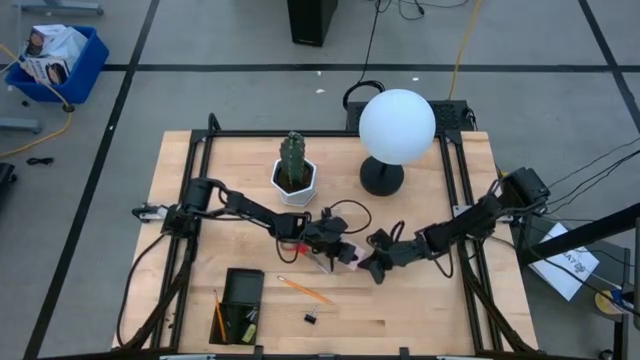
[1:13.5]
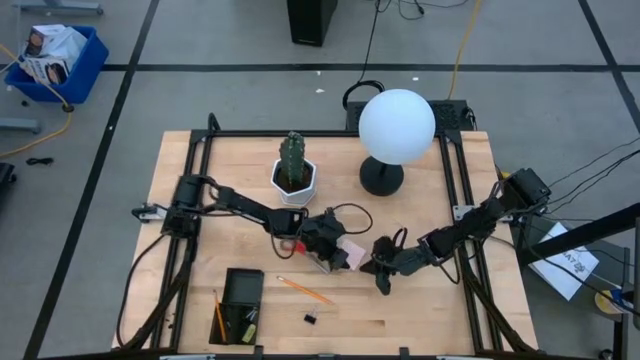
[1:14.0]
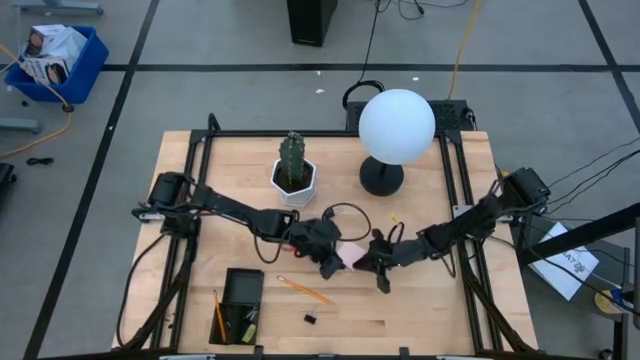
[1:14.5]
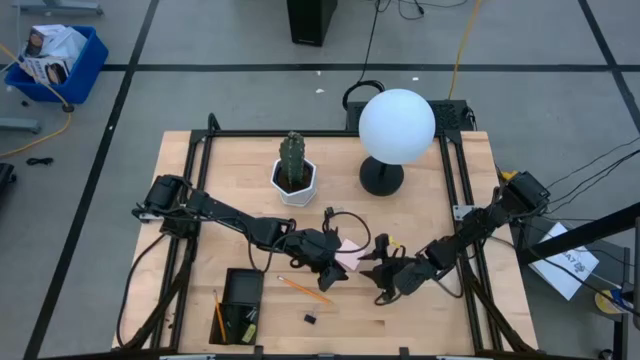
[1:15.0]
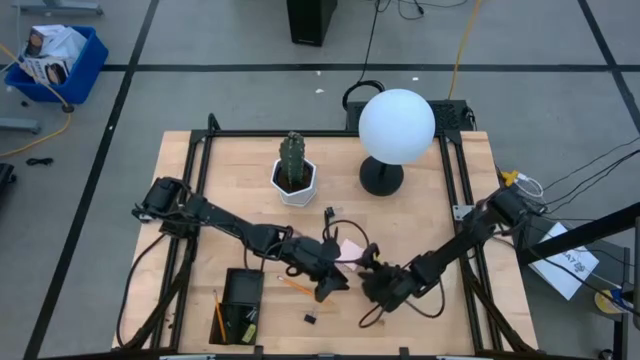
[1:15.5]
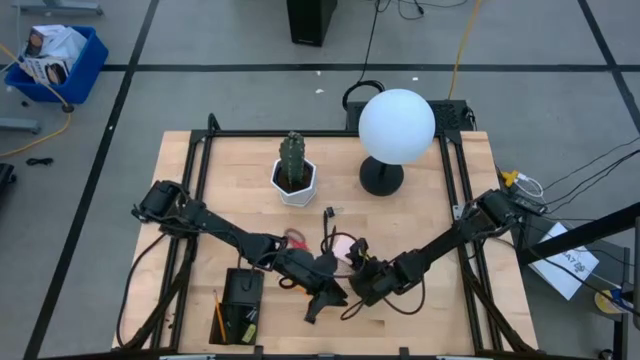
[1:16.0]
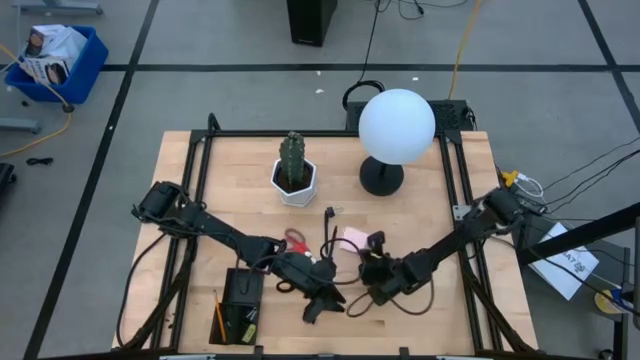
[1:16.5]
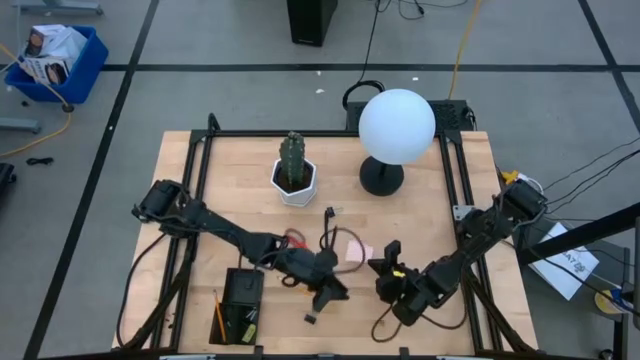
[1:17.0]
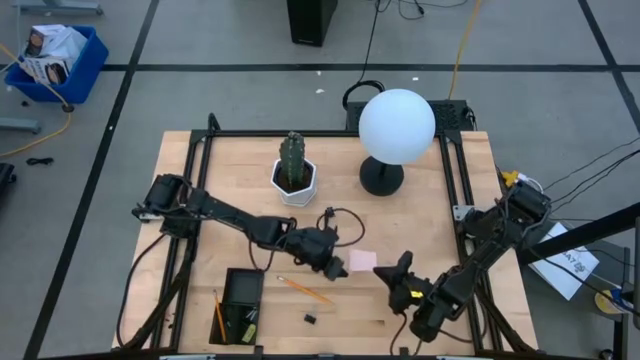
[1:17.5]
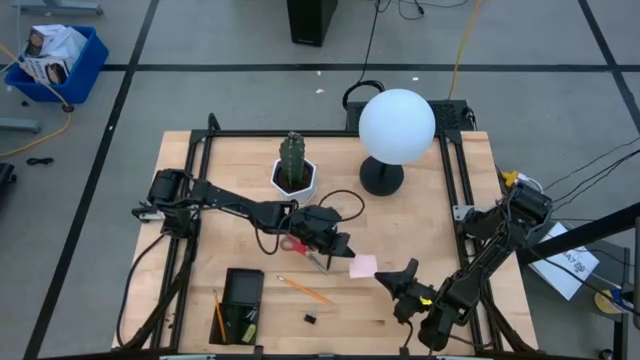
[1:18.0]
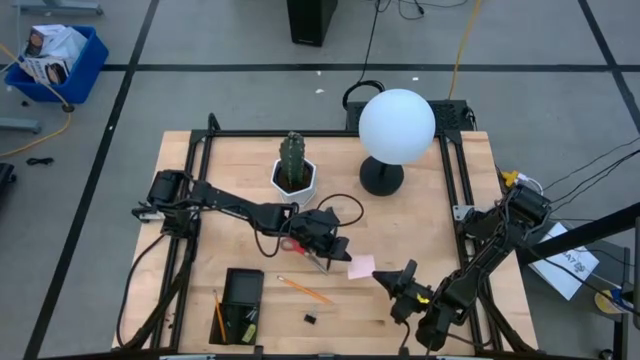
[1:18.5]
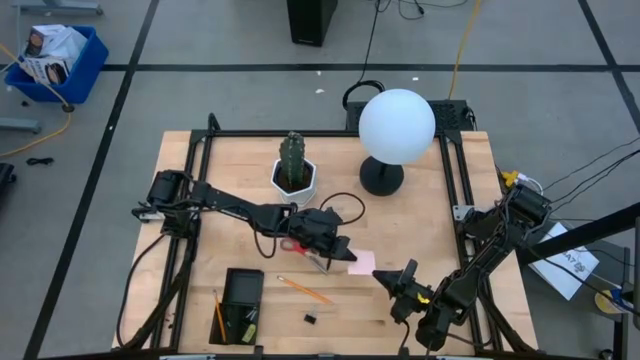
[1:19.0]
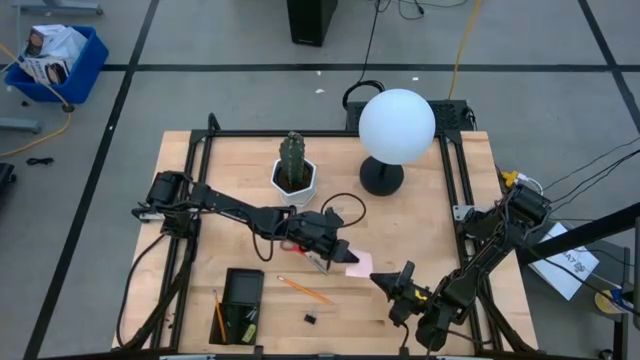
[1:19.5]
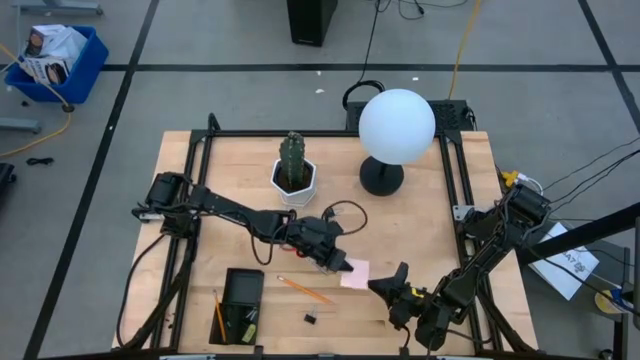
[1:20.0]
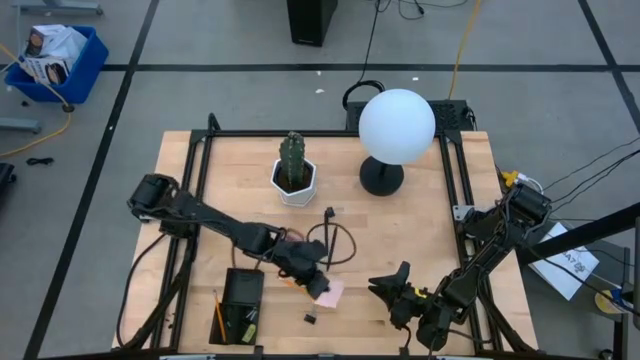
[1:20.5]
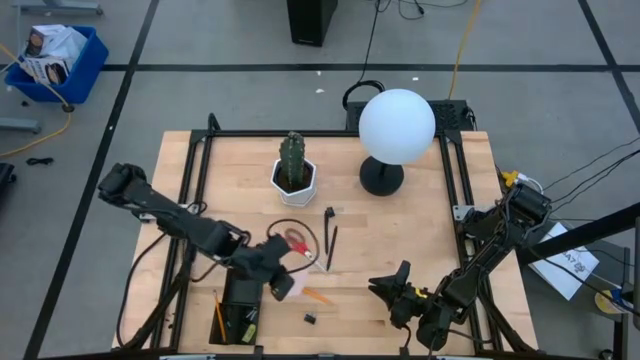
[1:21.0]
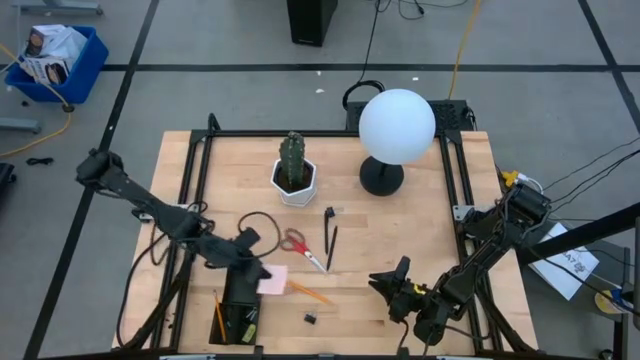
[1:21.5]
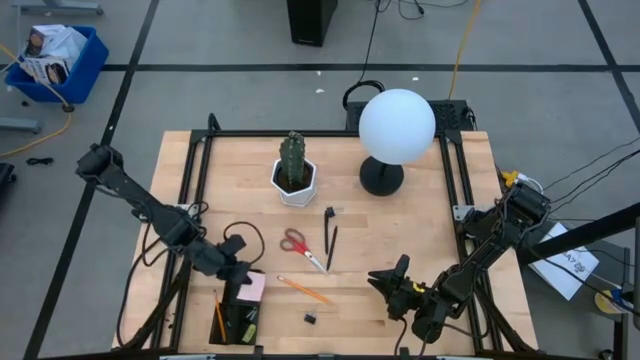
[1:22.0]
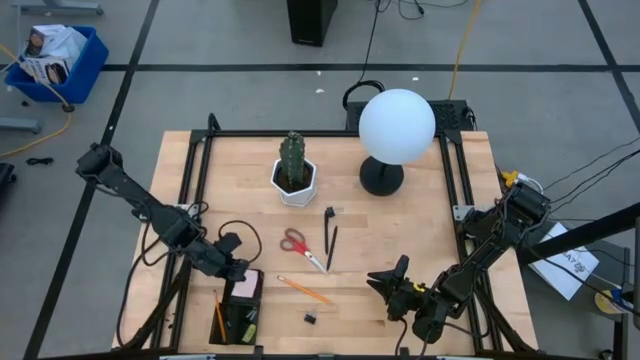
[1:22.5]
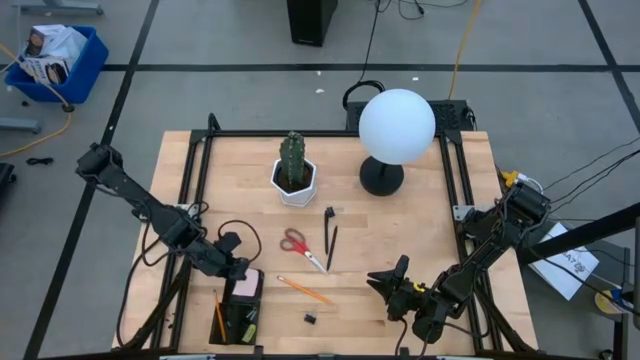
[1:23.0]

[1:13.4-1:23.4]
Task: Pick and place office supplies into organizer
Put the sticky notes in the desk organizer

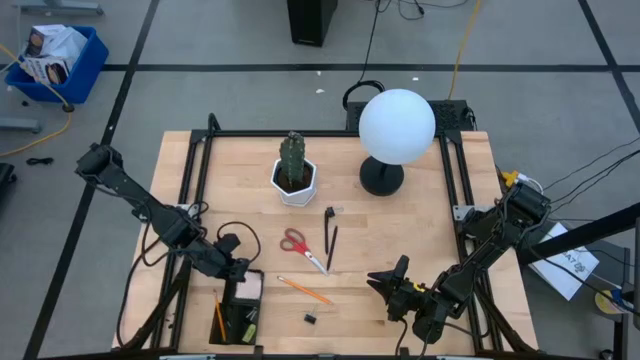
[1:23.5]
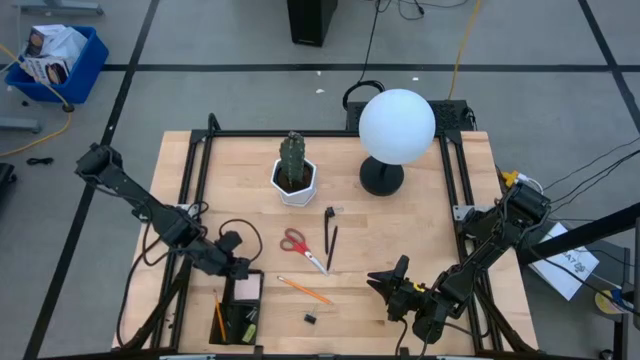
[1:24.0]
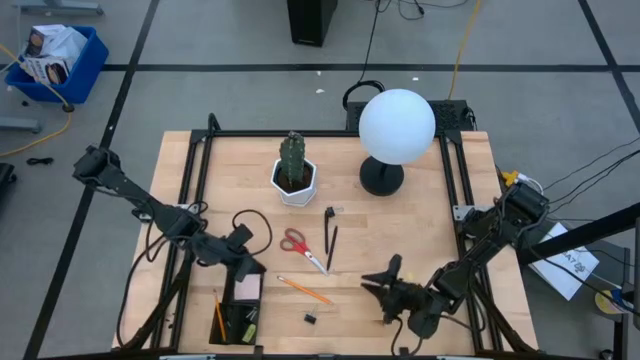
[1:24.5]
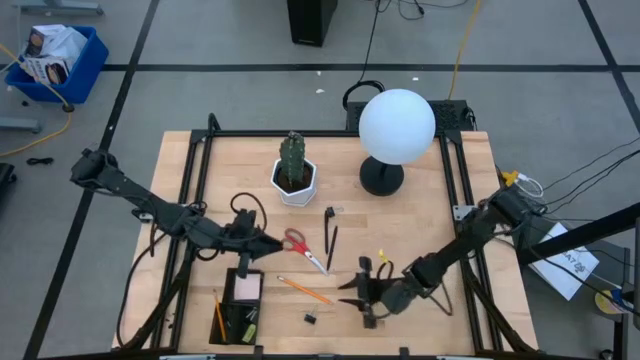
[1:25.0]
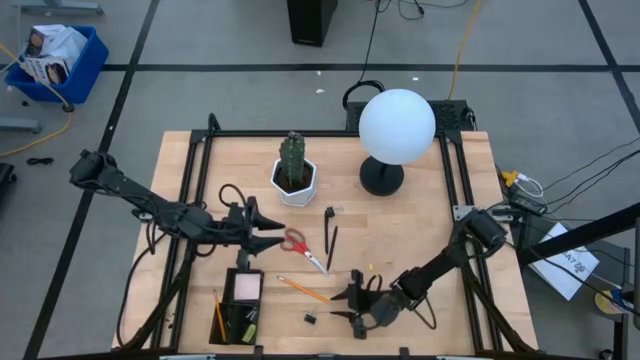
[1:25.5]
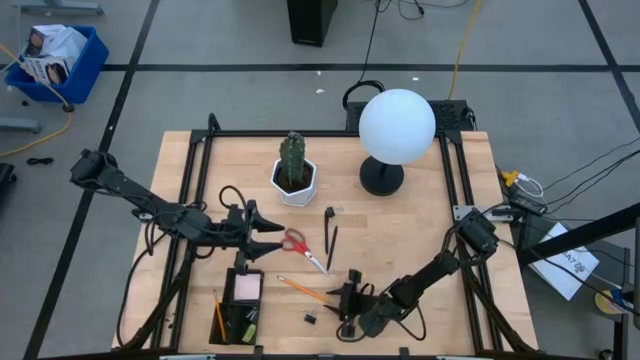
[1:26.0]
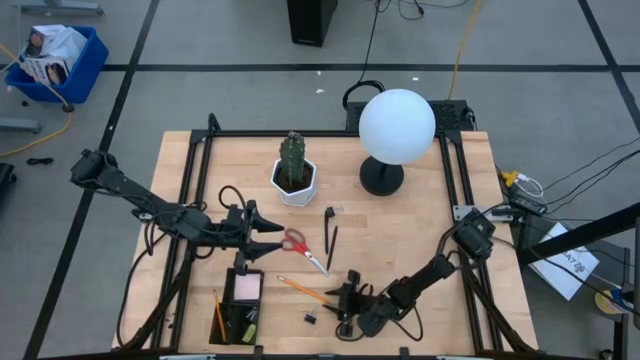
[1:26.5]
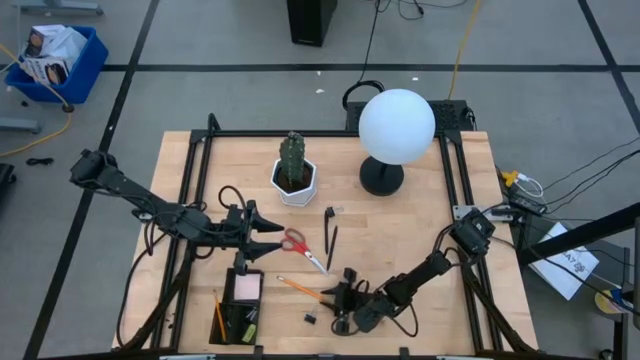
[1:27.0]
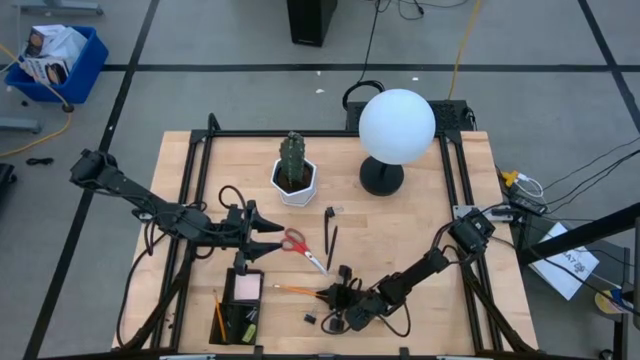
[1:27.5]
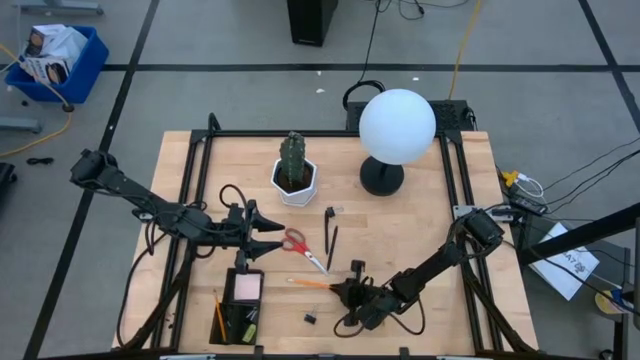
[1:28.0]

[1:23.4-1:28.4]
Put the pencil in the desk organizer

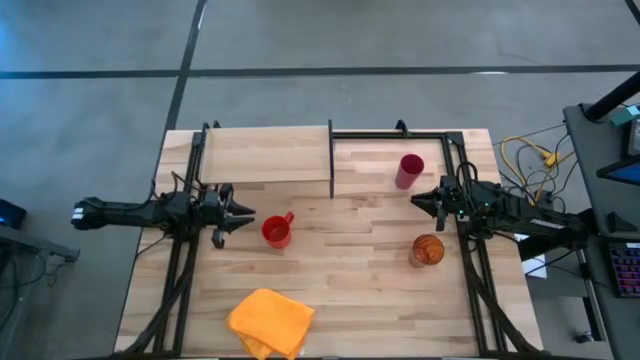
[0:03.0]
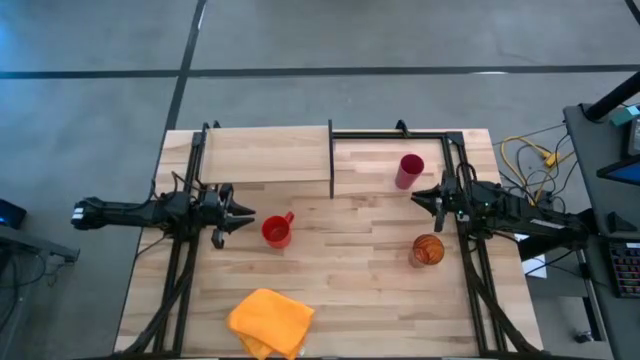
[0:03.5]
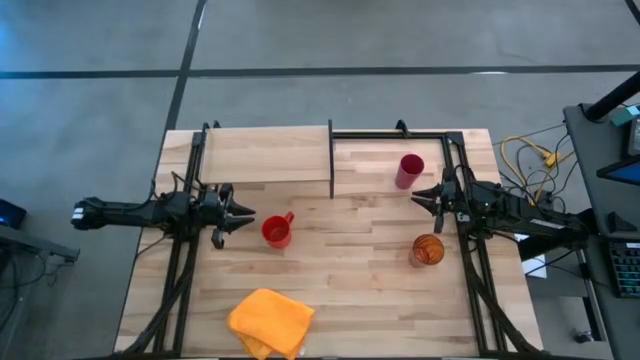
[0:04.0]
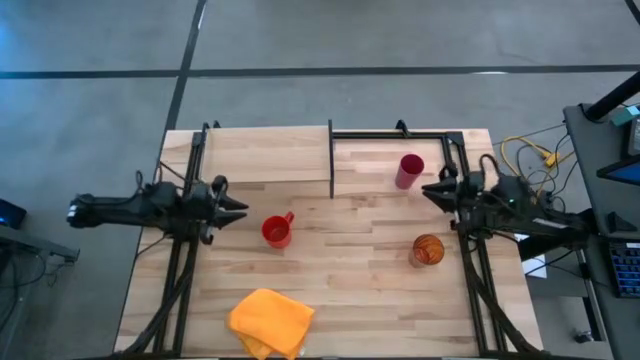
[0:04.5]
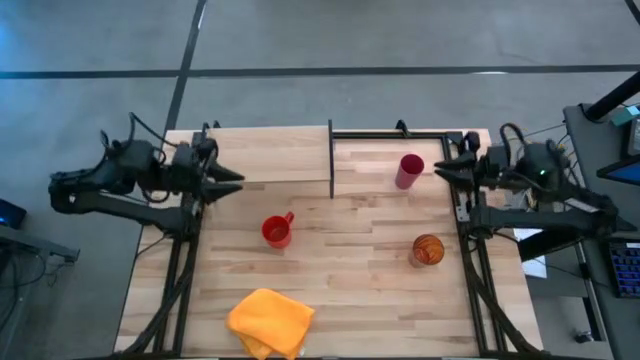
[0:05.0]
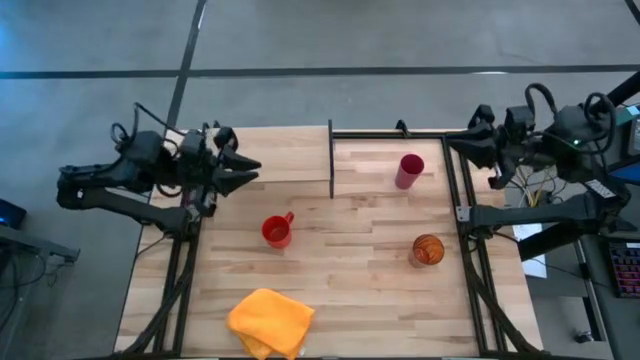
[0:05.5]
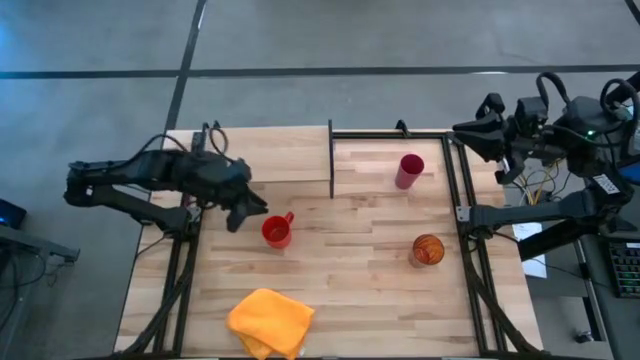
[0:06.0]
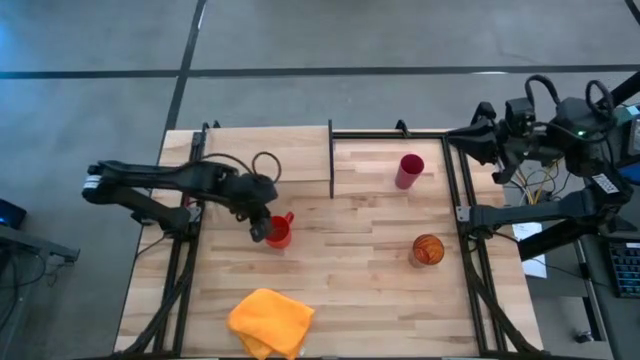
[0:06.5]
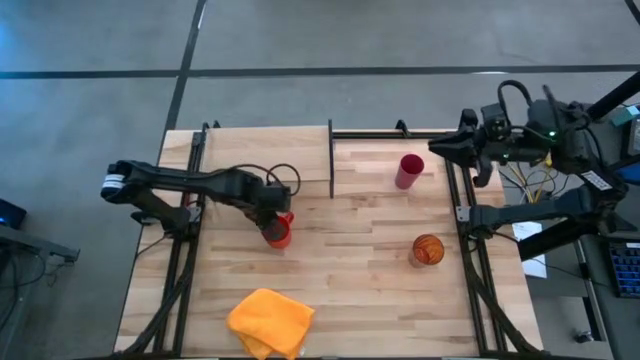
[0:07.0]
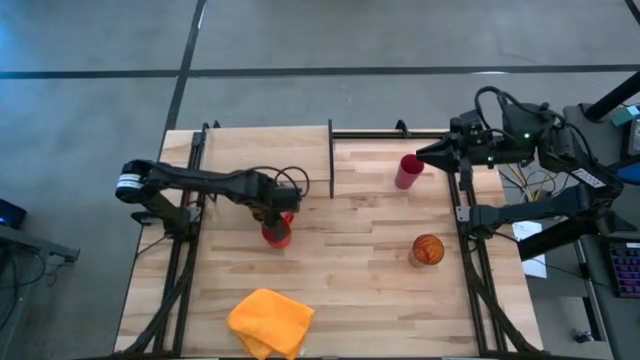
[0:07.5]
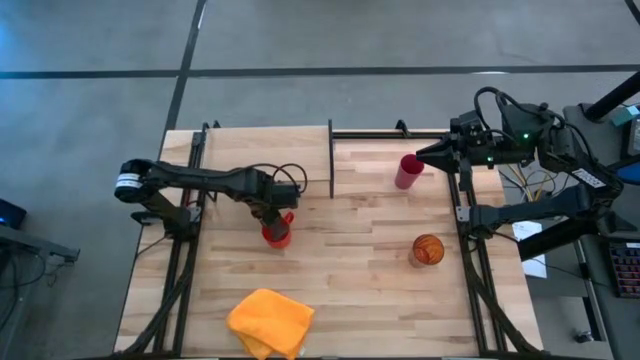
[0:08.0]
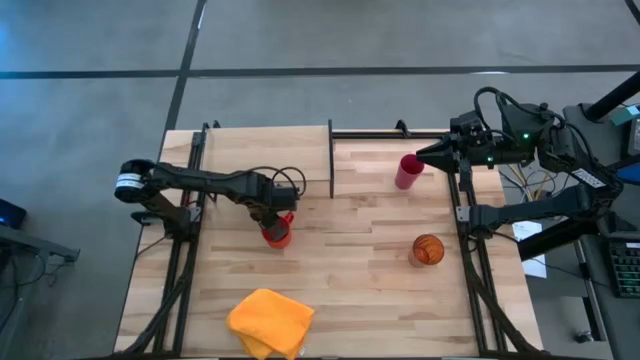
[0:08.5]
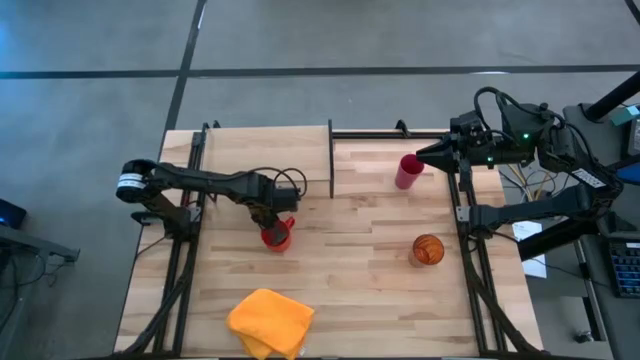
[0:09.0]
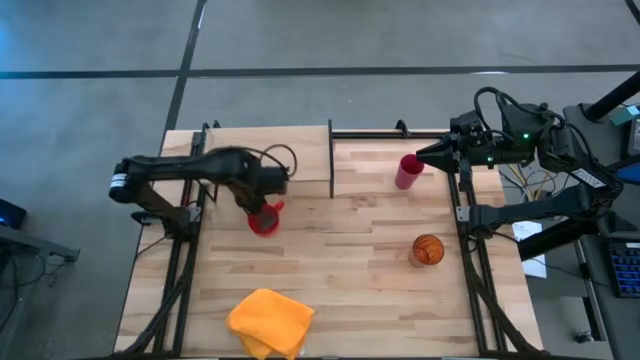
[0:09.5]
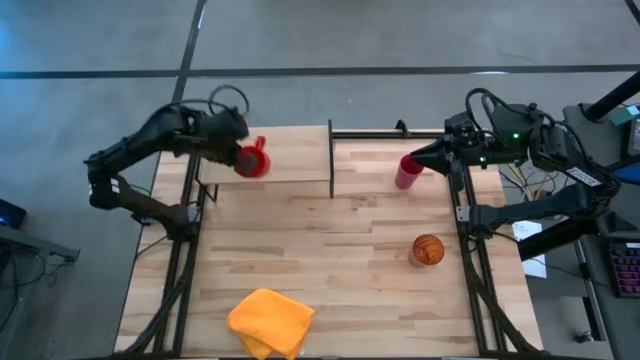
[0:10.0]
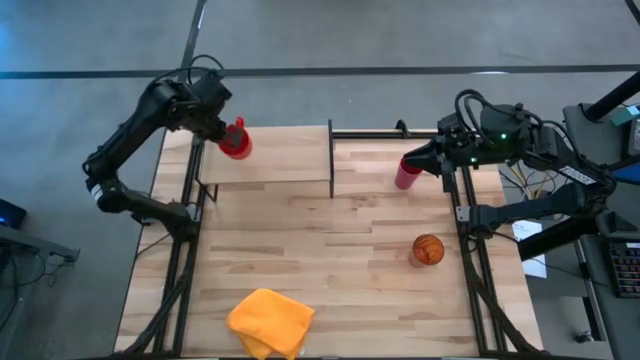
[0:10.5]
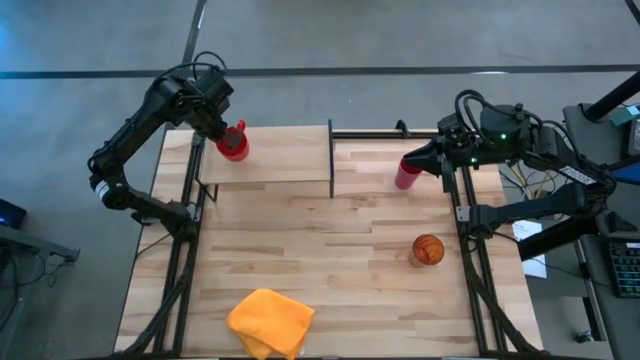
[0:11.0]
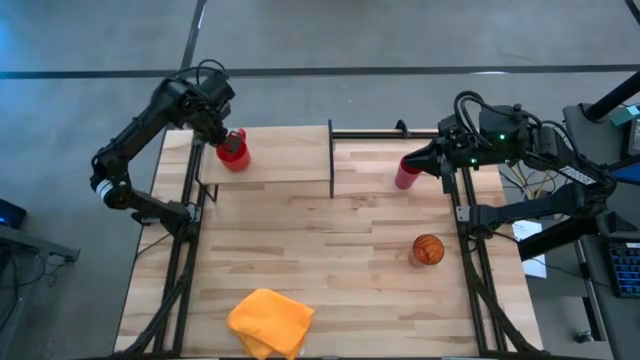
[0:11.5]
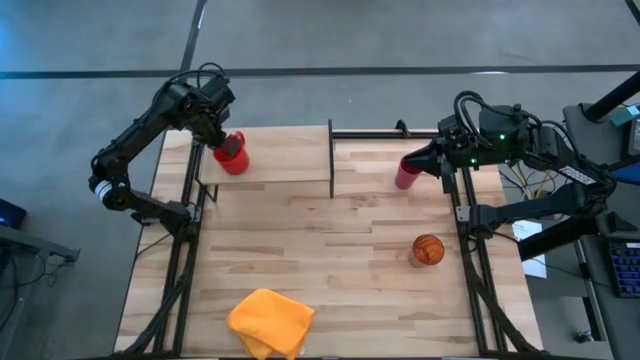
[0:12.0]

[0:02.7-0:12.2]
Task: Stack small to large cups/mugs on shelf
Put the orange mug on the shelf
